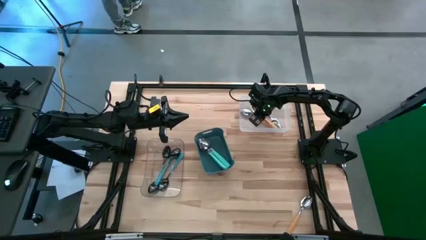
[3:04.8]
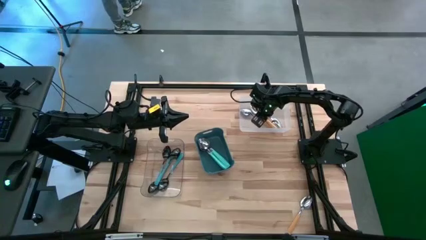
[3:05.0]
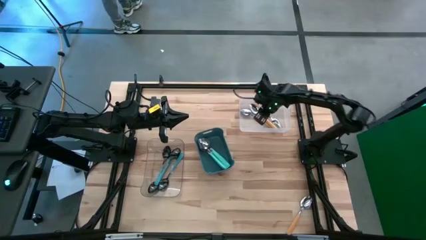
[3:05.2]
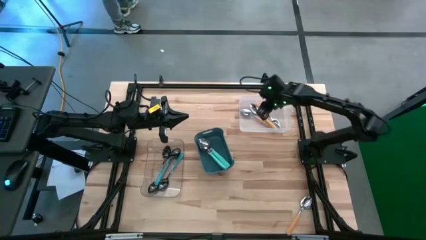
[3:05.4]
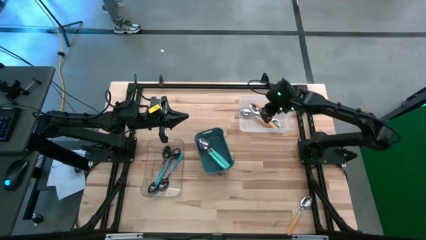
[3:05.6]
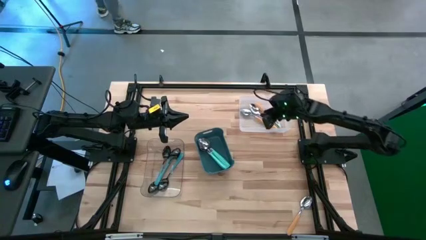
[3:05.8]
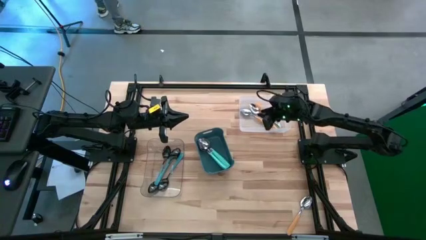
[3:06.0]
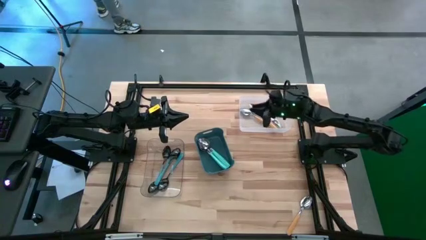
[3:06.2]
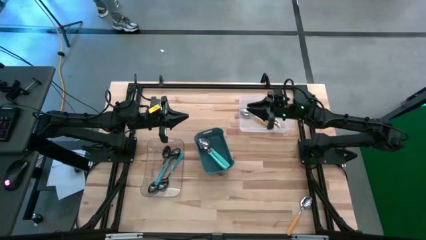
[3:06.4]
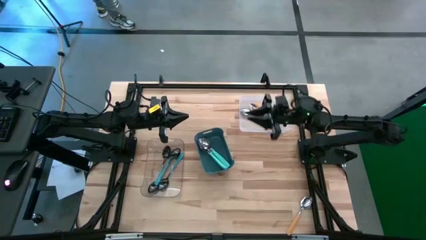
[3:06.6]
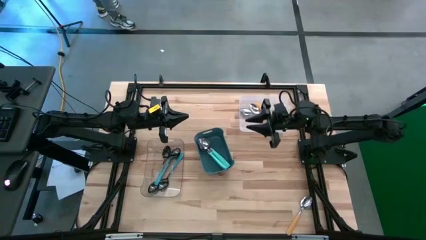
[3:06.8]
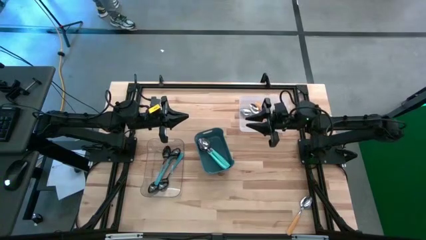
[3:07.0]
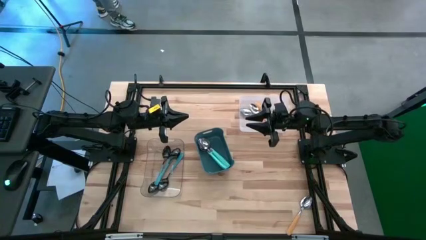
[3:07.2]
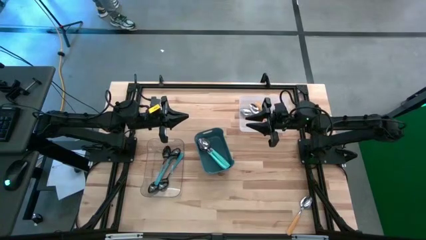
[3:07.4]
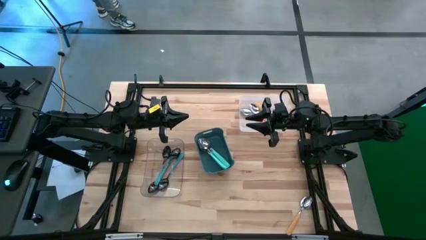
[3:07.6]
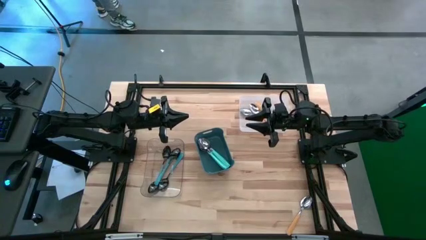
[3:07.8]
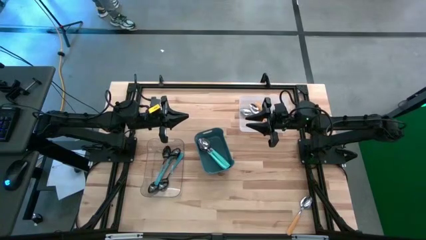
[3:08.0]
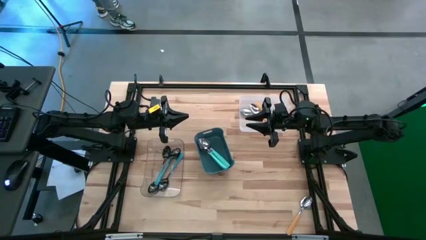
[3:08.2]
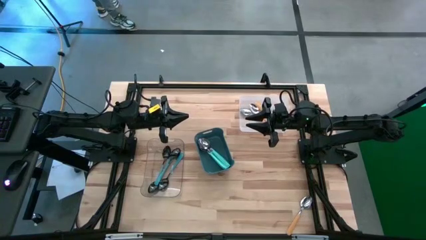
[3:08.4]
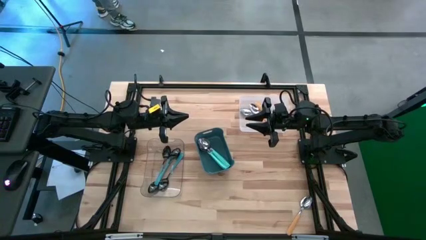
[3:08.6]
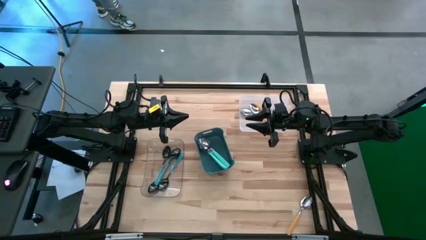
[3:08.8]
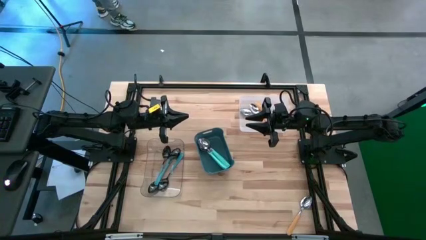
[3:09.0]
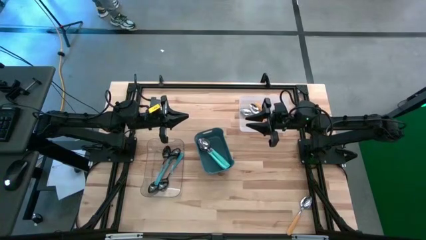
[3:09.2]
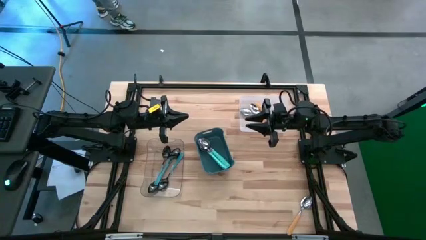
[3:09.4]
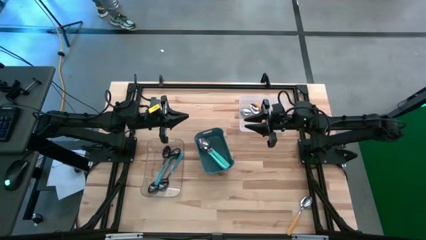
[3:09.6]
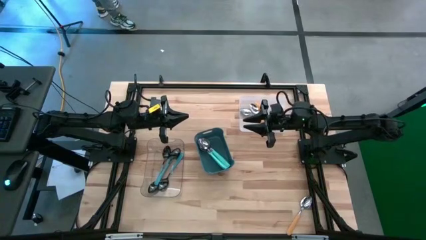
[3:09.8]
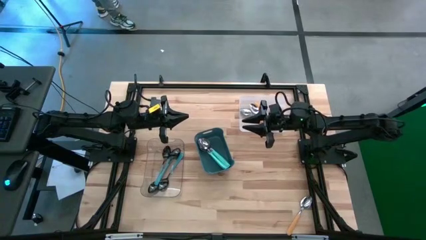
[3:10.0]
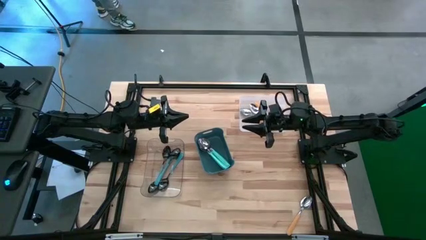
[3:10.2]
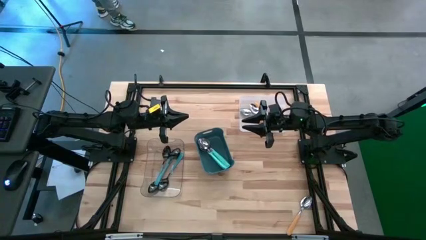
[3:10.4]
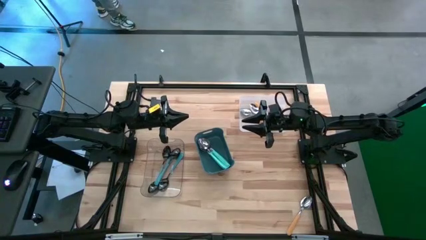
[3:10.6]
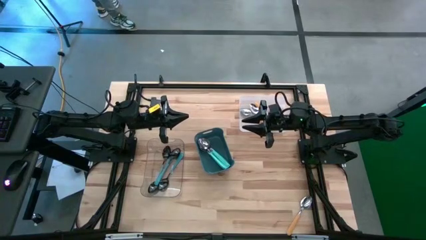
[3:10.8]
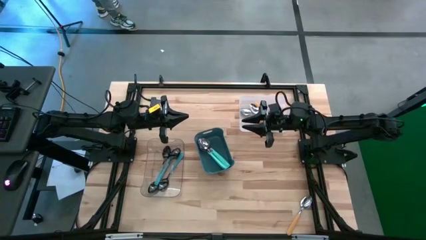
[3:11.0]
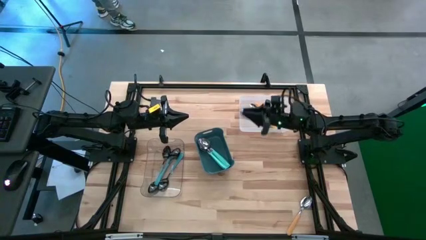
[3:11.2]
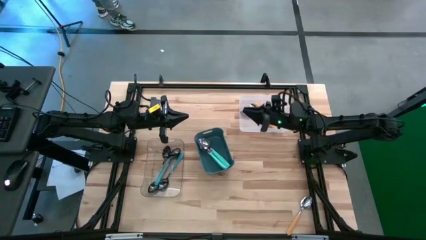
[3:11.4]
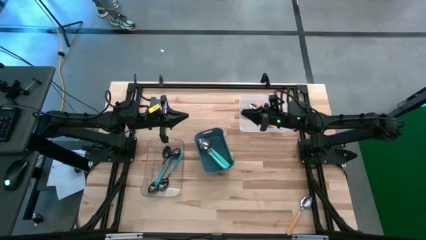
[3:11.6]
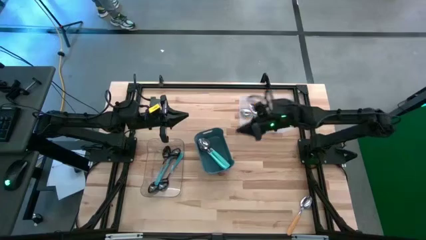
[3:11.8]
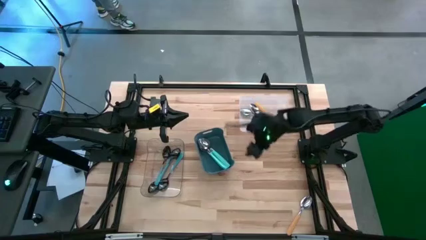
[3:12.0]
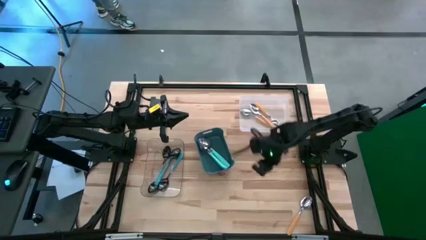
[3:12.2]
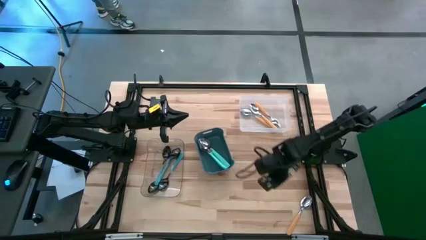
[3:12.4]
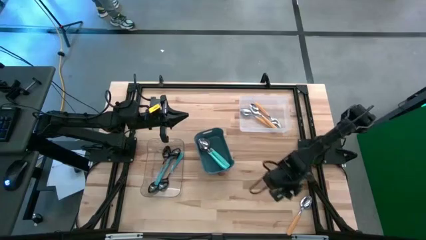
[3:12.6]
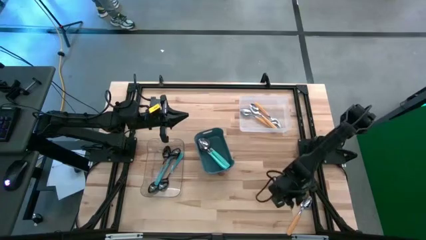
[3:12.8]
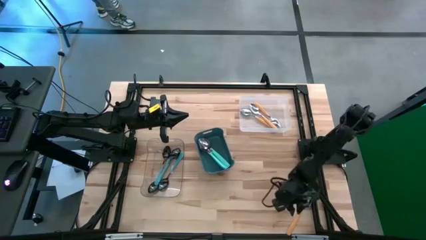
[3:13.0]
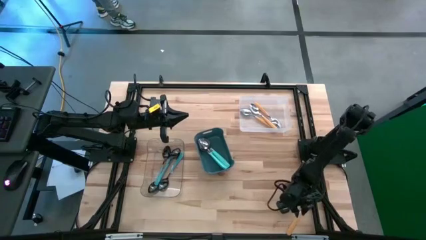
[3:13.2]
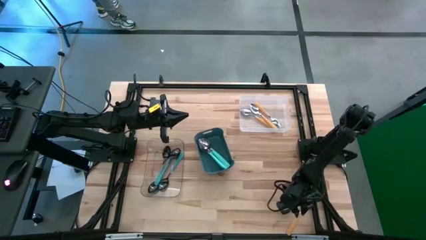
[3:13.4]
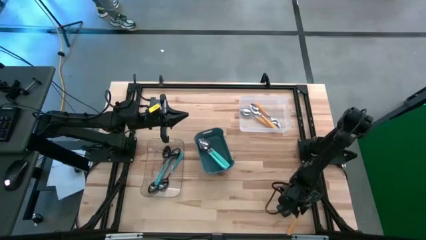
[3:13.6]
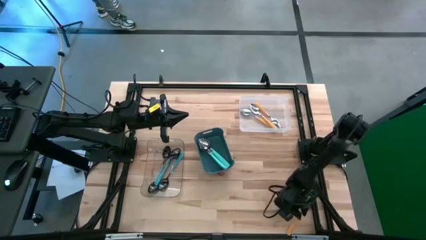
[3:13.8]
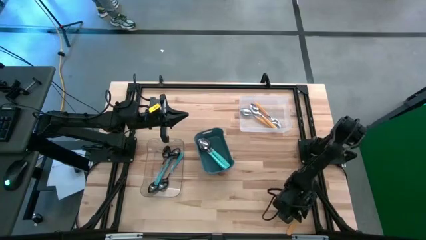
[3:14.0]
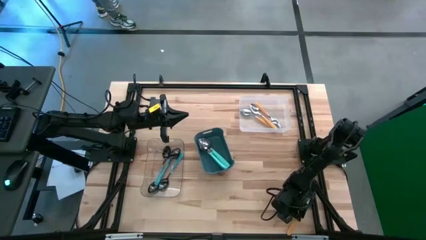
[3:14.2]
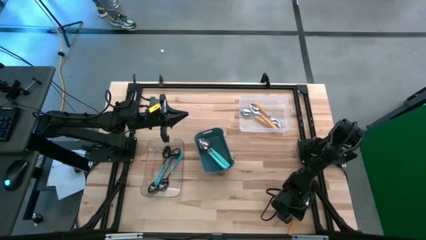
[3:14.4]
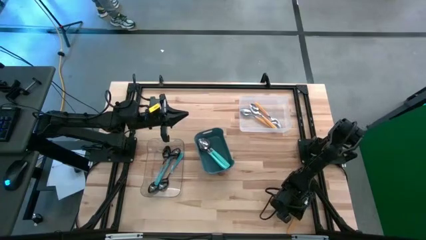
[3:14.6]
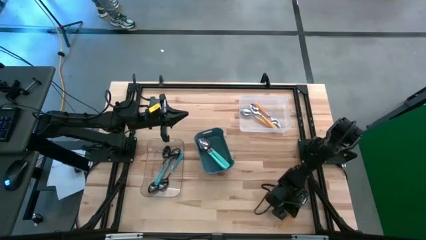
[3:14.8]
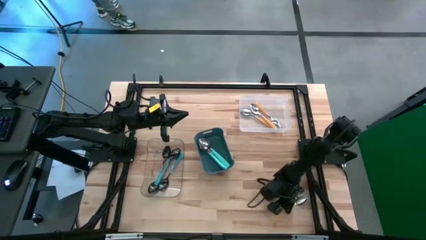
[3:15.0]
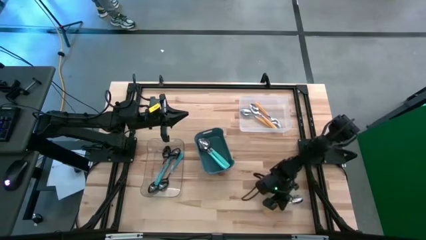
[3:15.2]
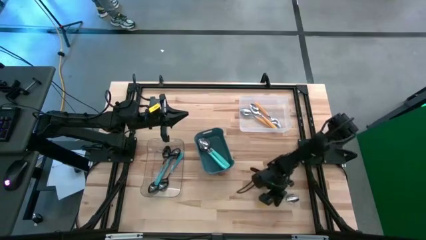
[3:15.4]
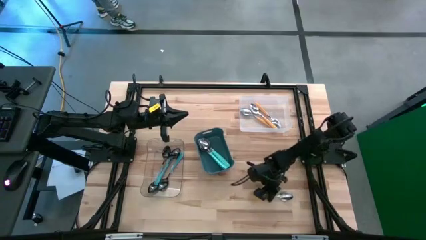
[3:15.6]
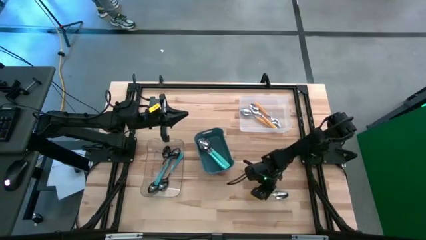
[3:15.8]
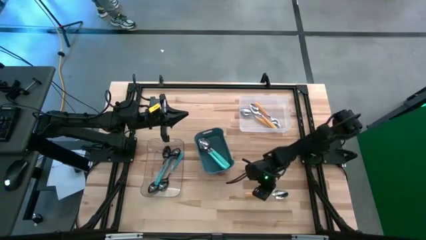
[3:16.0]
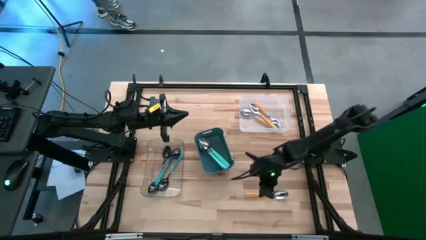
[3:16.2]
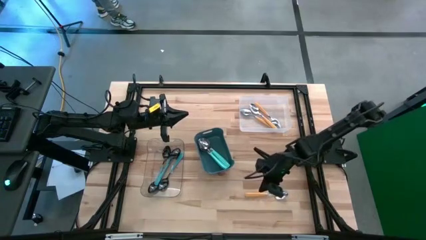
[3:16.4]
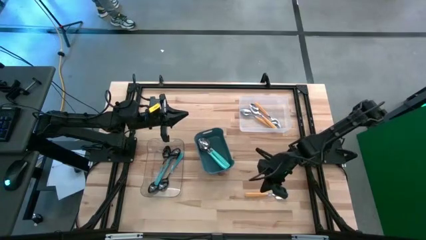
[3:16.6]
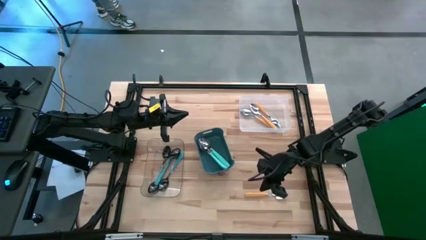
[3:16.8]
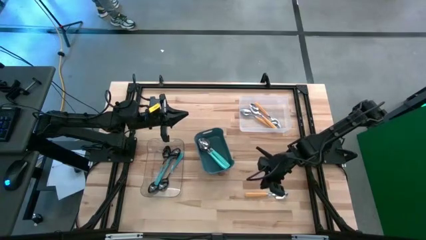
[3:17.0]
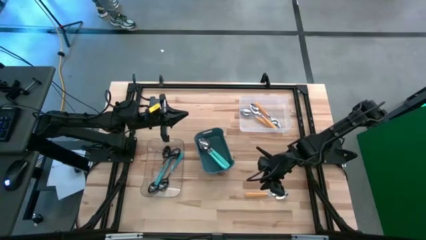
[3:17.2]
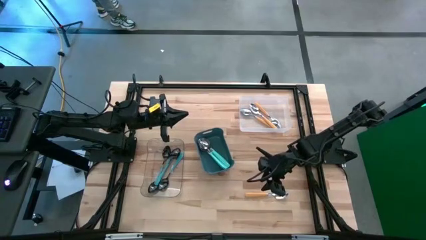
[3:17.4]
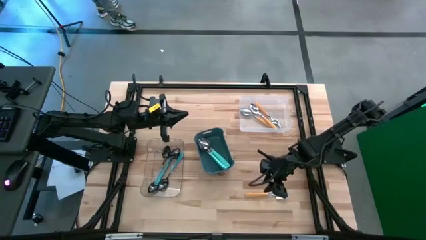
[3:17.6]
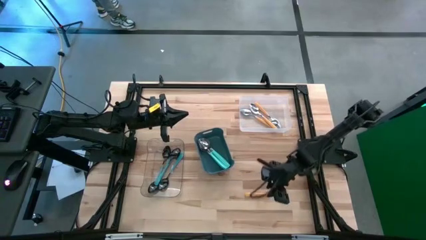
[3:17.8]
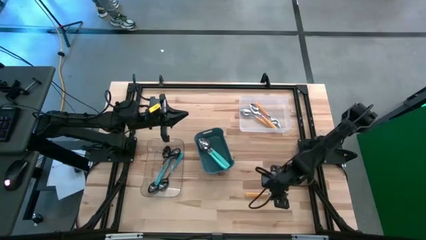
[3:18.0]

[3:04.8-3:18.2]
Task: Sort silverware by color (type)
Put the orange table spoon into the white bin

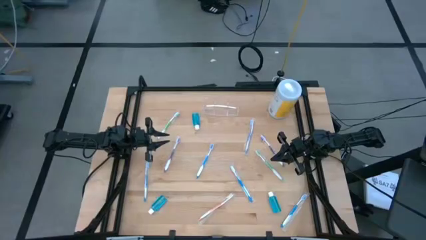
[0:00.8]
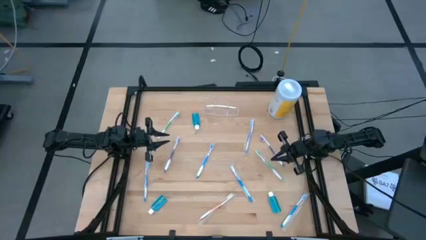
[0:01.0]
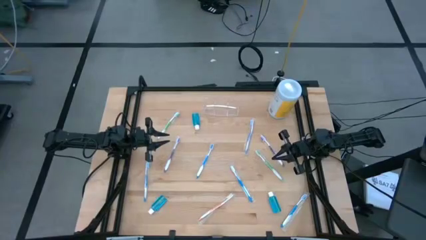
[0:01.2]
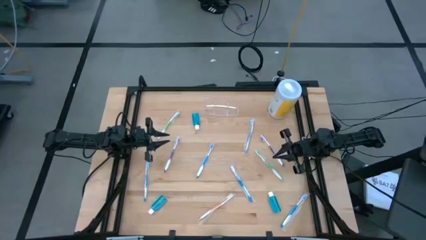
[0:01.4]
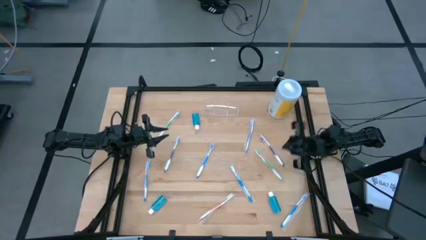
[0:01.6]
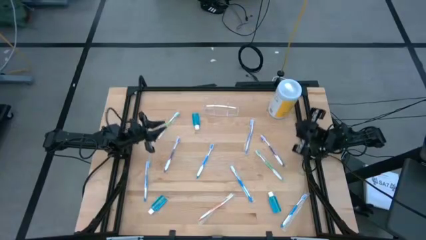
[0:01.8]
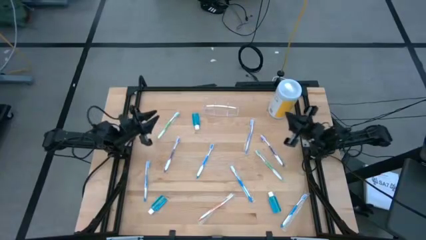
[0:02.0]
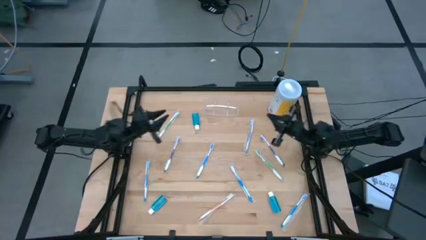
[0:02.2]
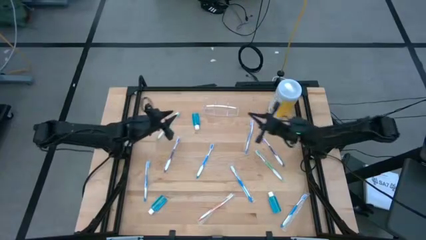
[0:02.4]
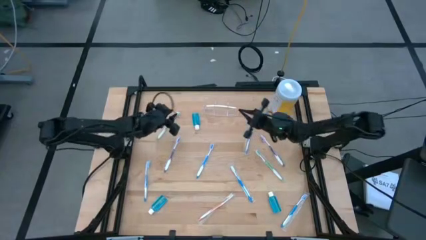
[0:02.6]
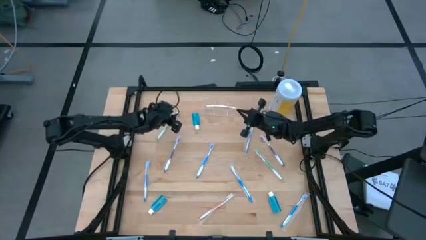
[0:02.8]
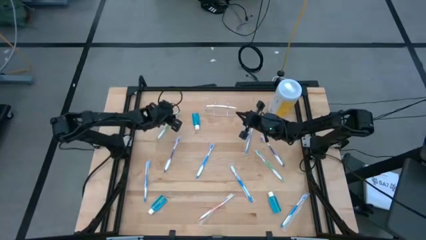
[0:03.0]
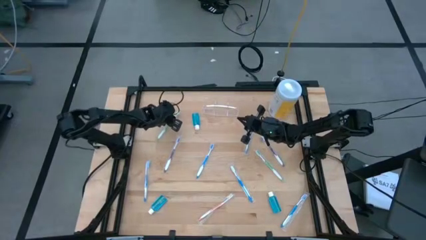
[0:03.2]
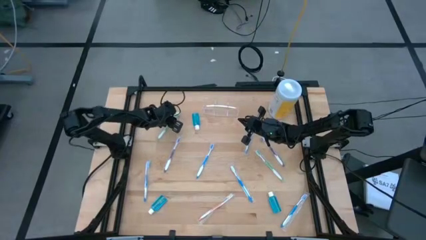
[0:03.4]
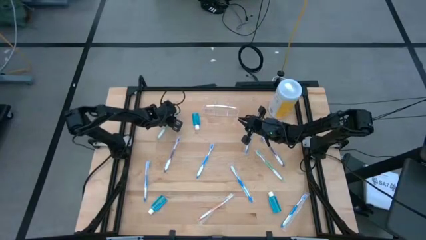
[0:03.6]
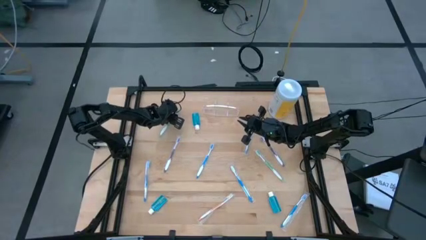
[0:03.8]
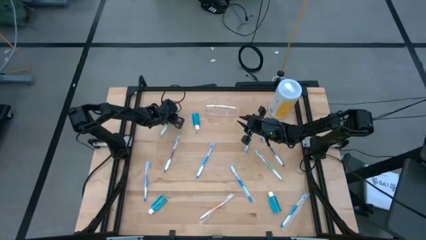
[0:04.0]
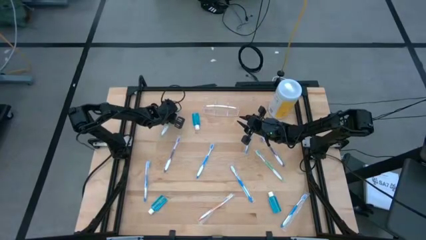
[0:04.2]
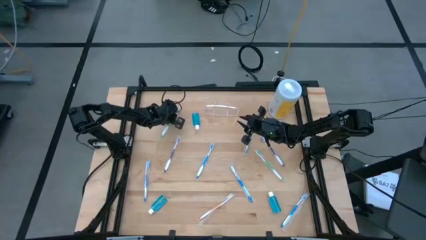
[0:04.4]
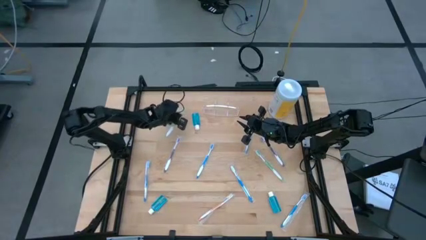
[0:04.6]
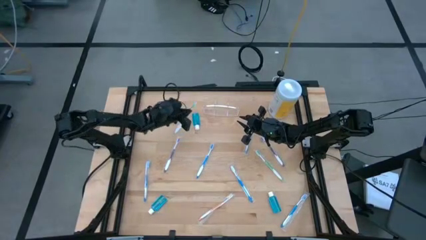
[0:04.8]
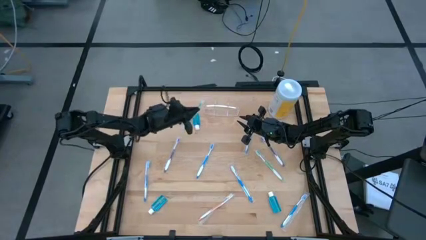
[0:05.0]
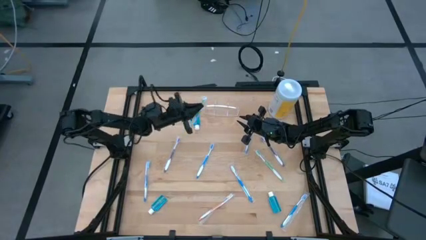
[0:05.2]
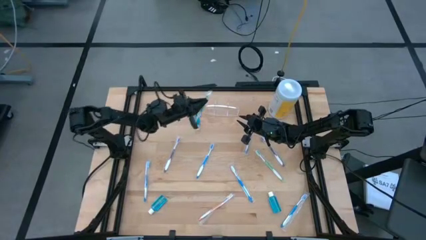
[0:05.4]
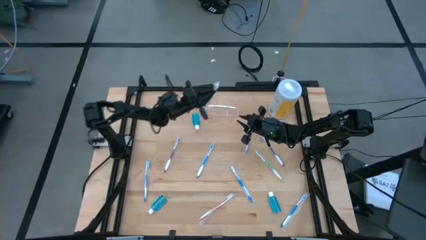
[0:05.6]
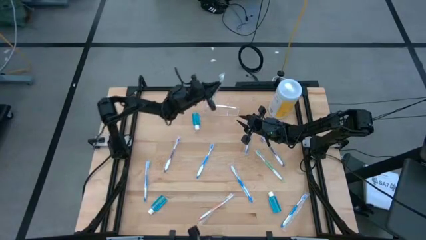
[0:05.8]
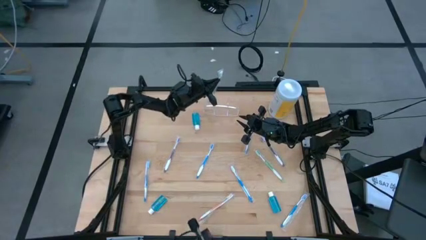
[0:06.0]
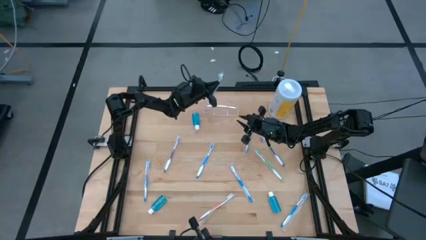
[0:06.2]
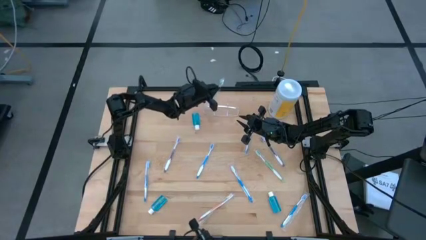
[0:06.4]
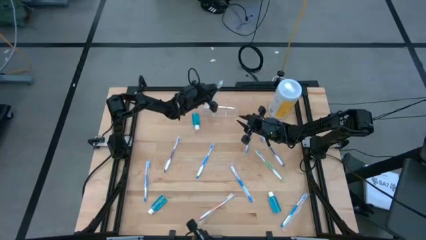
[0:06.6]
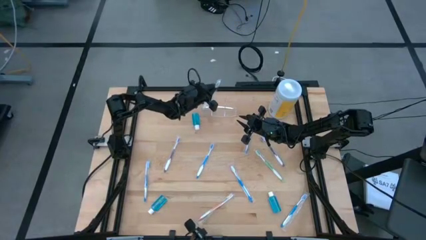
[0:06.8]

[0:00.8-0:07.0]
Task: Pick & Place toothbrushing station
Put the green toothbrush into the transparent organizer
